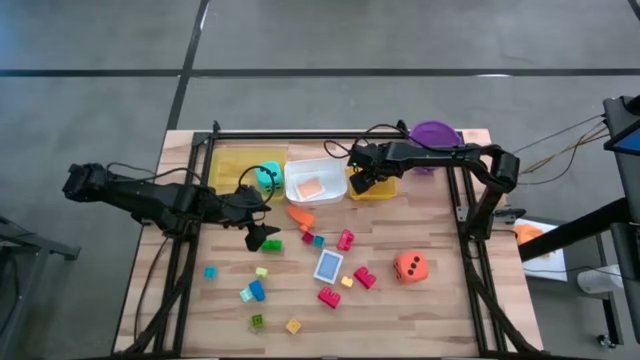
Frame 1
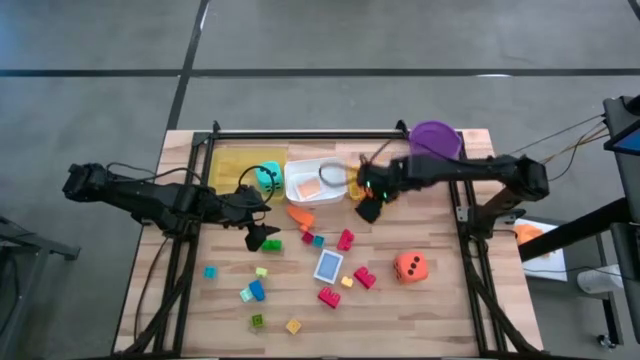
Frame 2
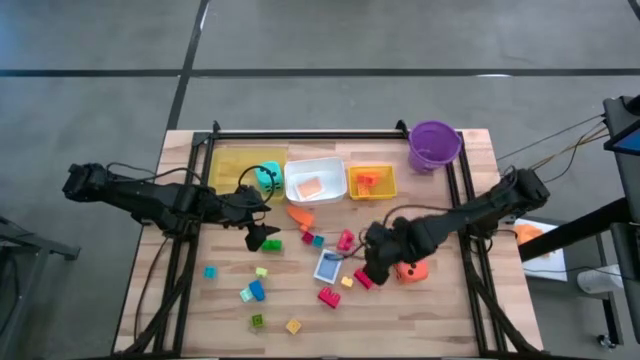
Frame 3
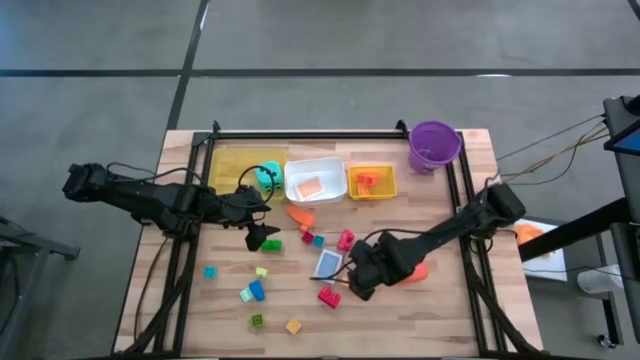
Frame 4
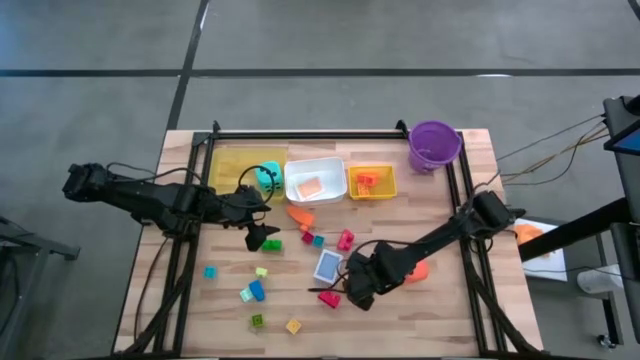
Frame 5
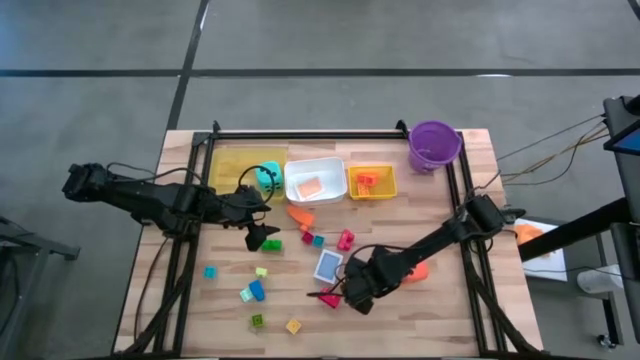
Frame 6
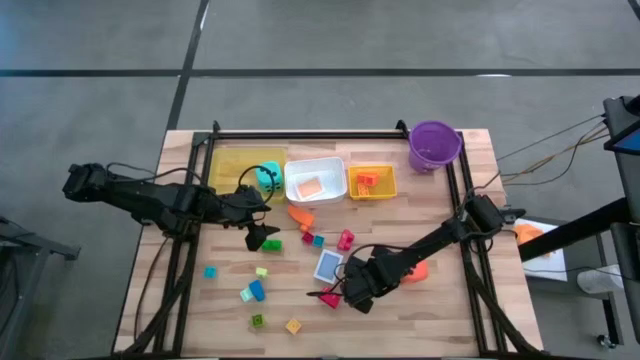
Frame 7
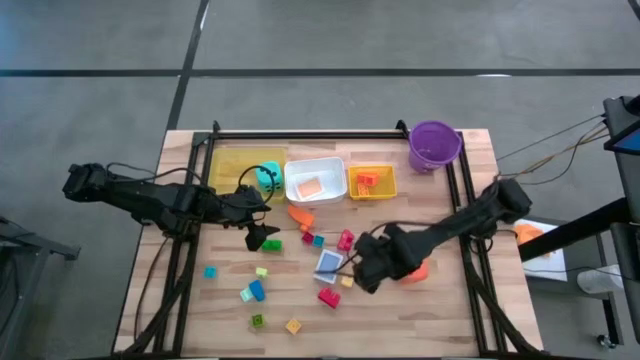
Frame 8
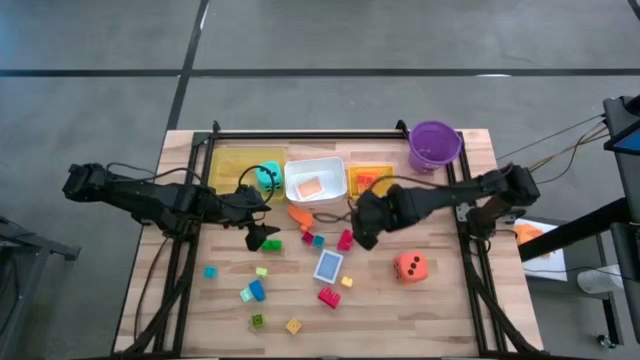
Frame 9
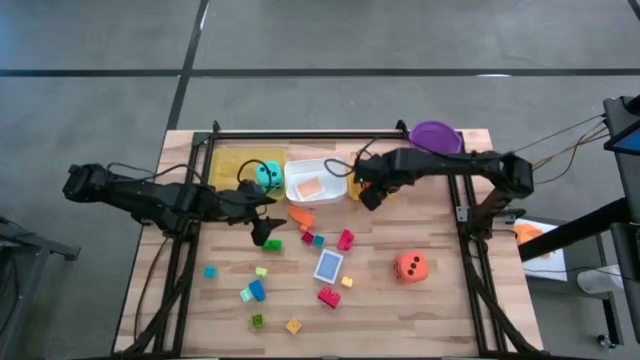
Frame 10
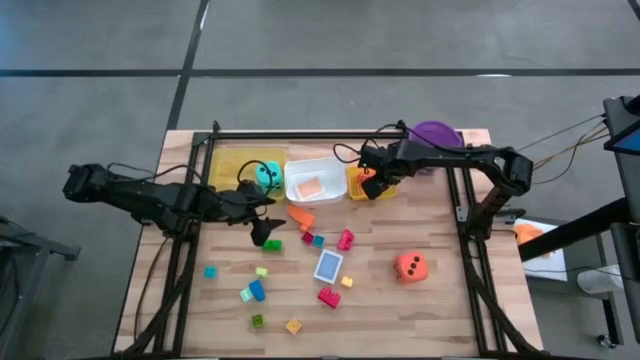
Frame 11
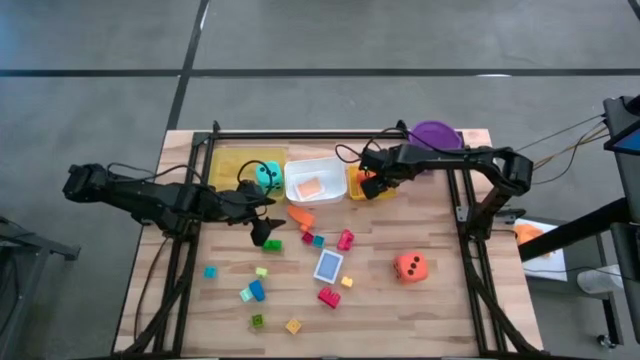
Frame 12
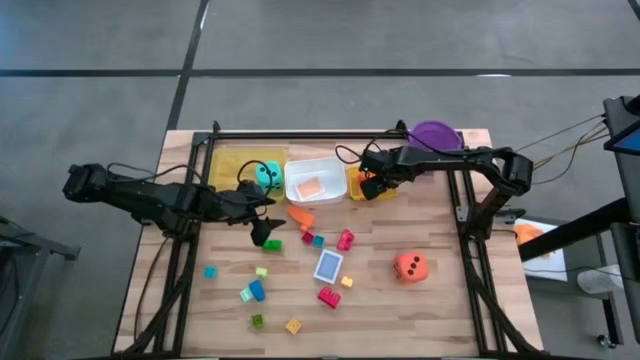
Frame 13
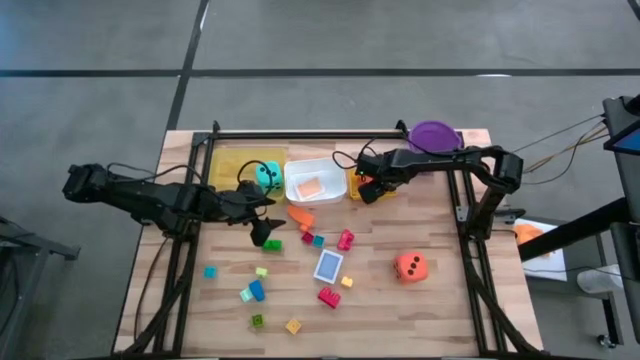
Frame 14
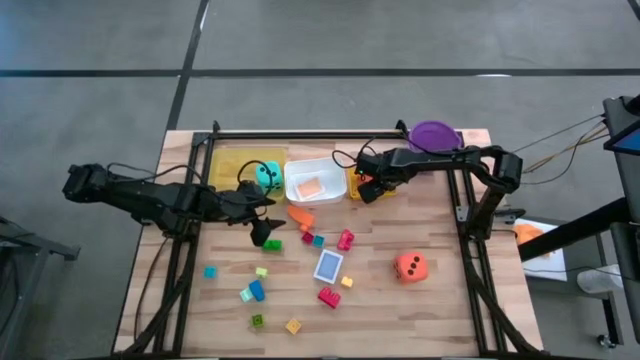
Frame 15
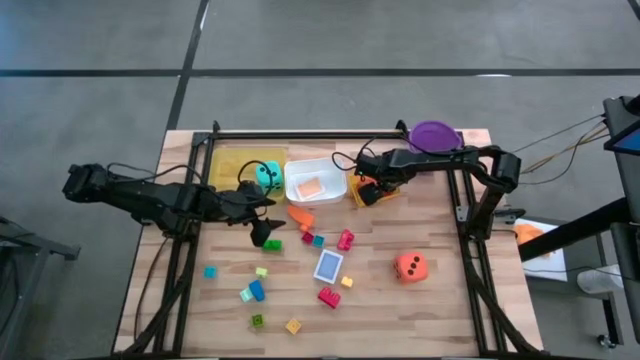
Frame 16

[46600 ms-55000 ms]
Task: Pick & Place Toys
Put the red game piece into the yellow bin

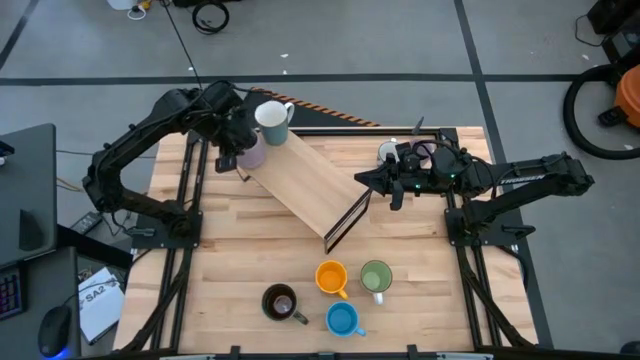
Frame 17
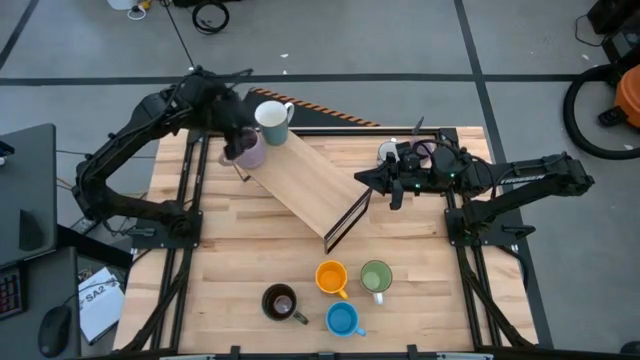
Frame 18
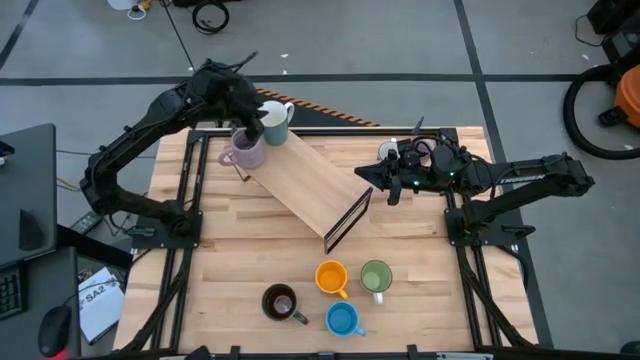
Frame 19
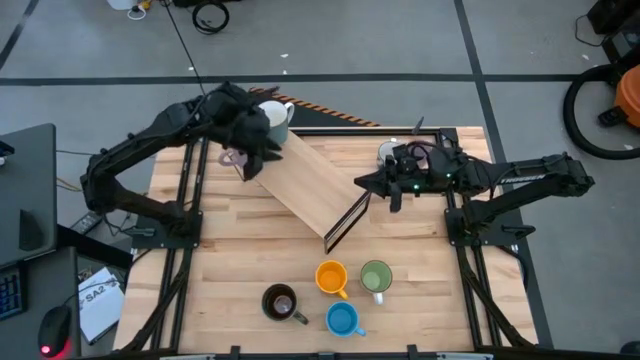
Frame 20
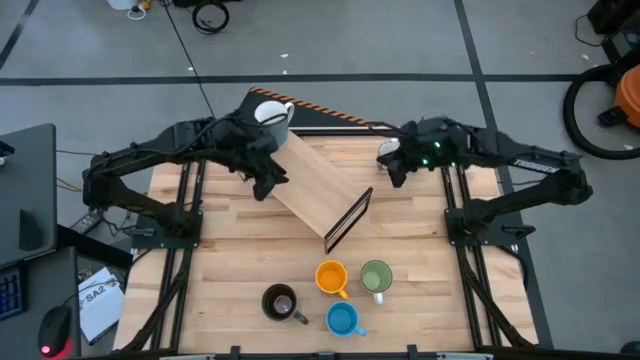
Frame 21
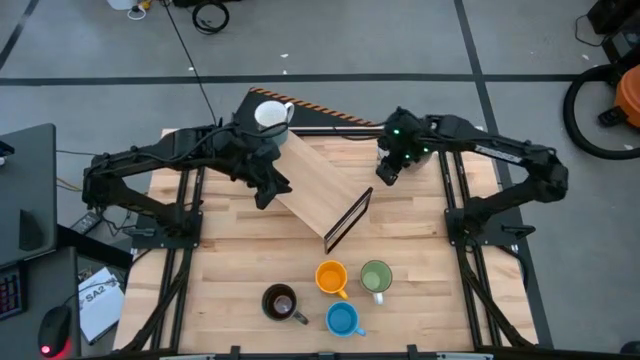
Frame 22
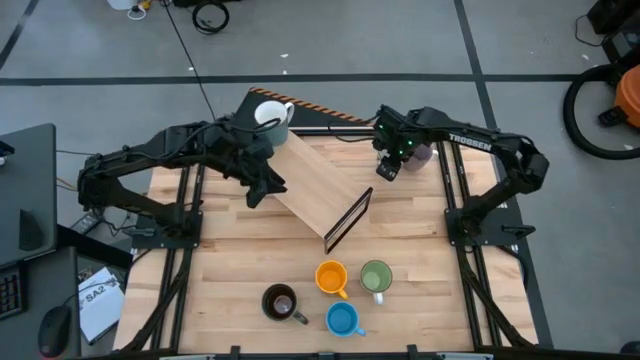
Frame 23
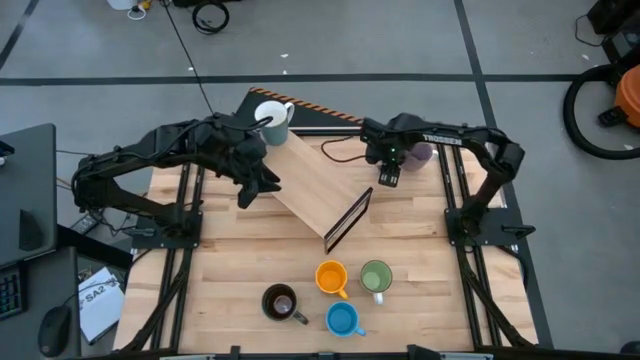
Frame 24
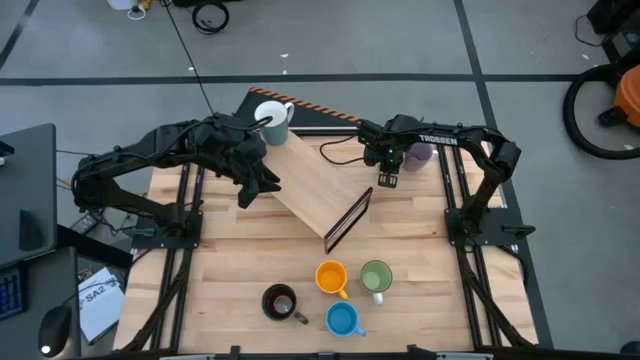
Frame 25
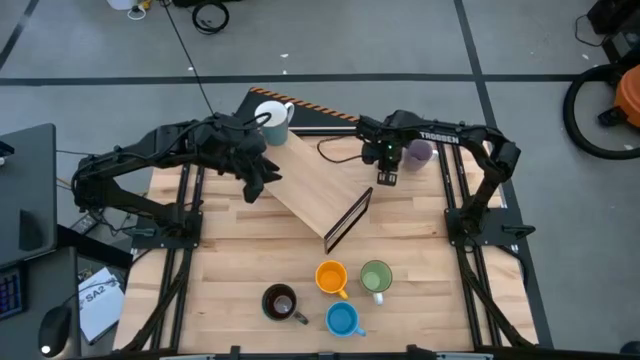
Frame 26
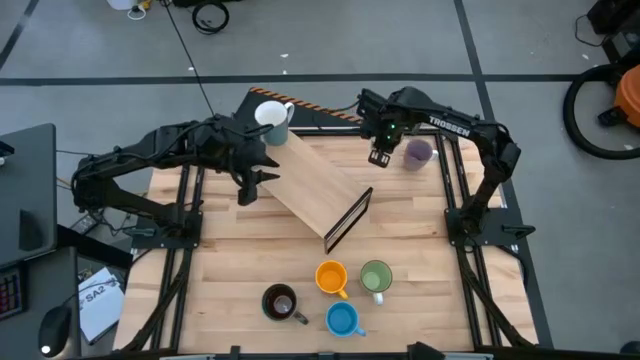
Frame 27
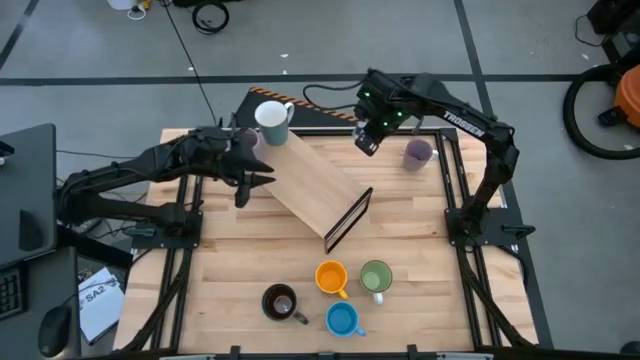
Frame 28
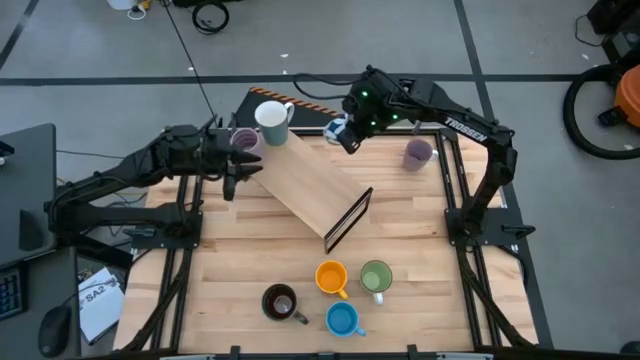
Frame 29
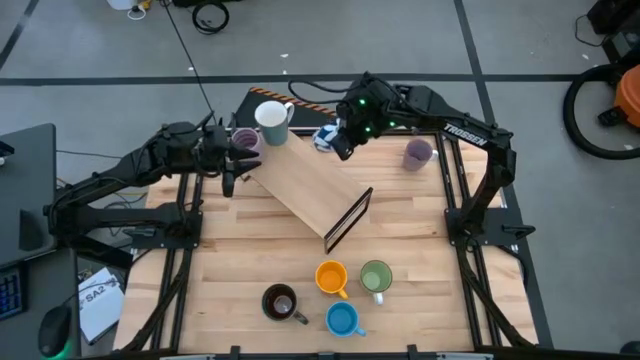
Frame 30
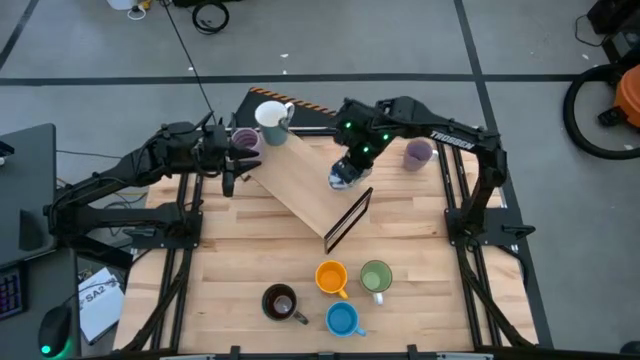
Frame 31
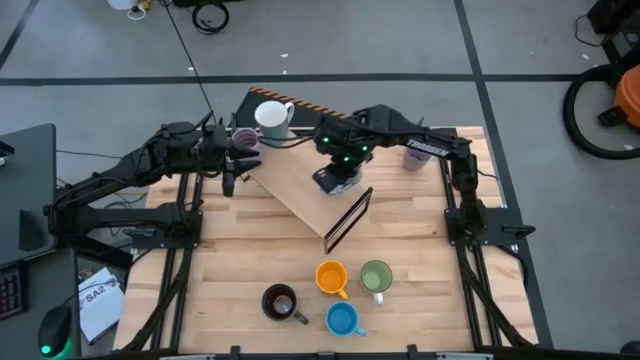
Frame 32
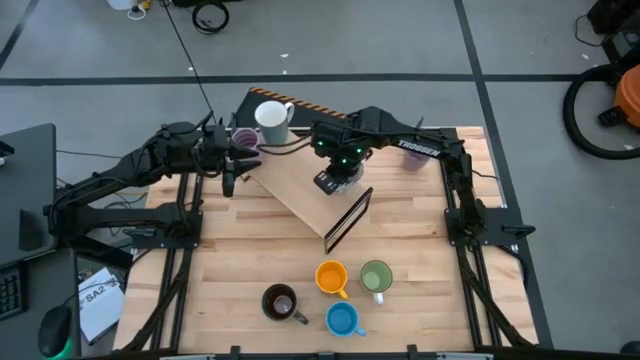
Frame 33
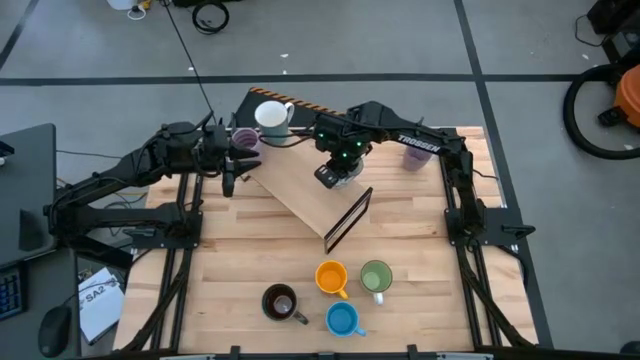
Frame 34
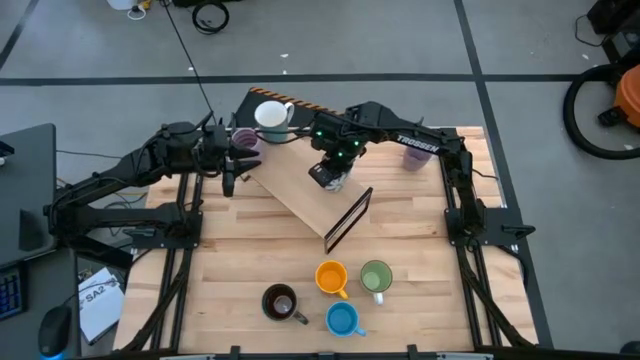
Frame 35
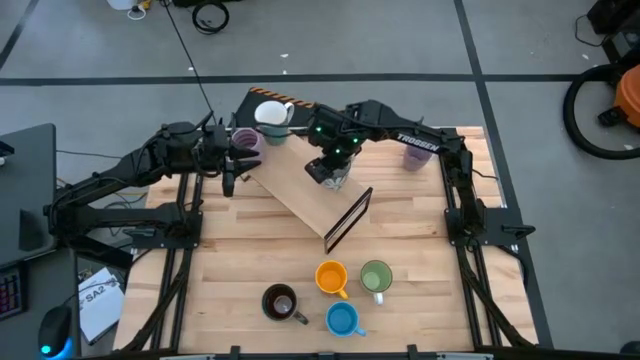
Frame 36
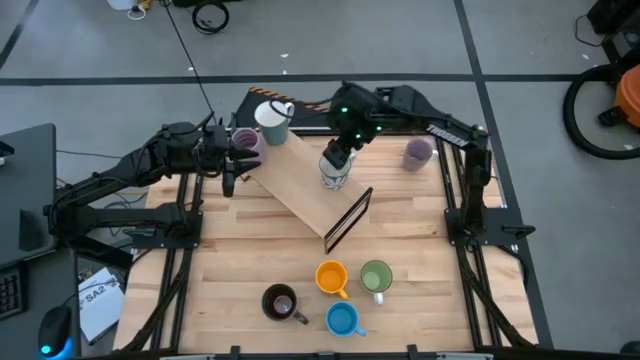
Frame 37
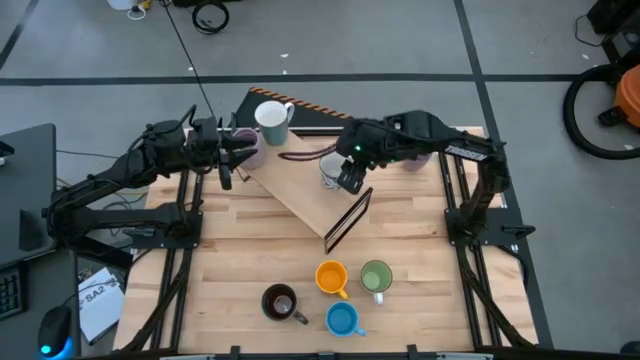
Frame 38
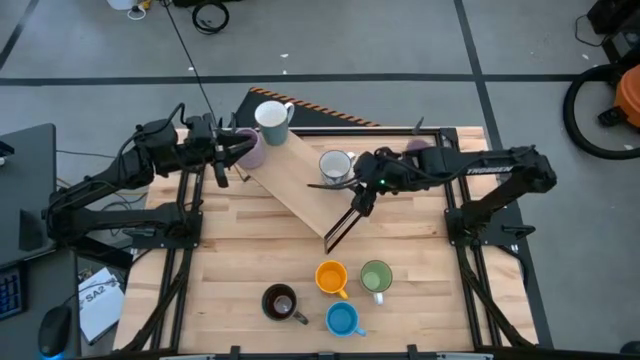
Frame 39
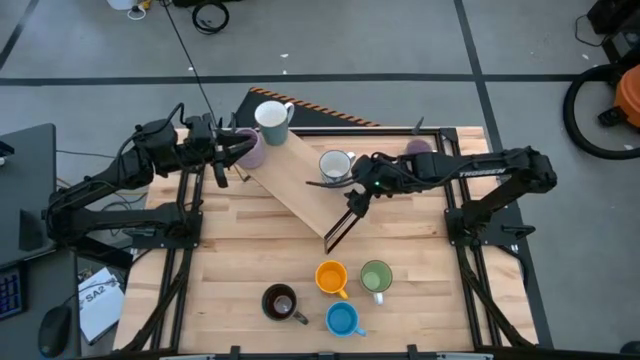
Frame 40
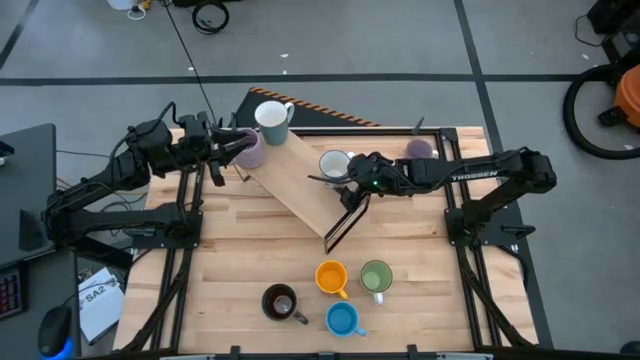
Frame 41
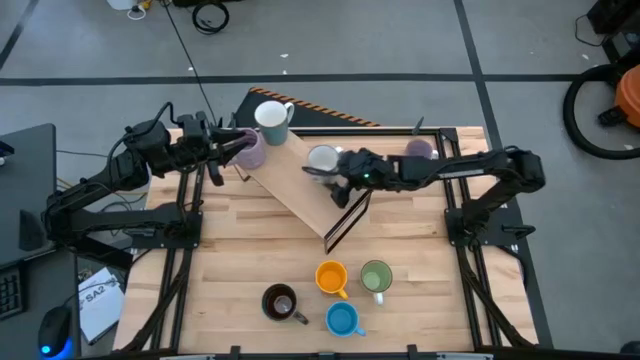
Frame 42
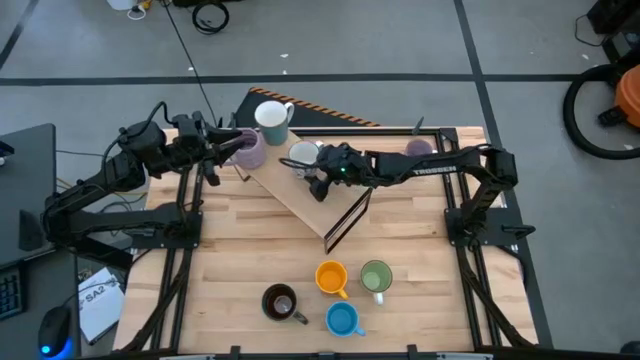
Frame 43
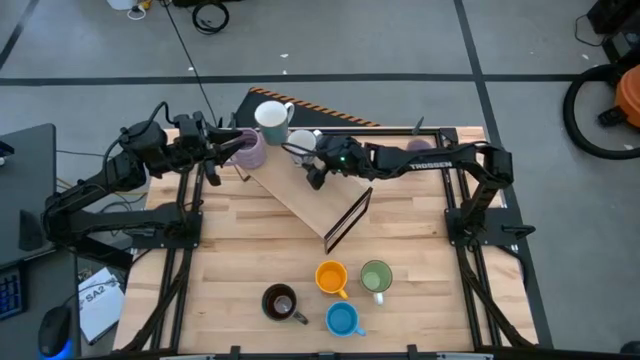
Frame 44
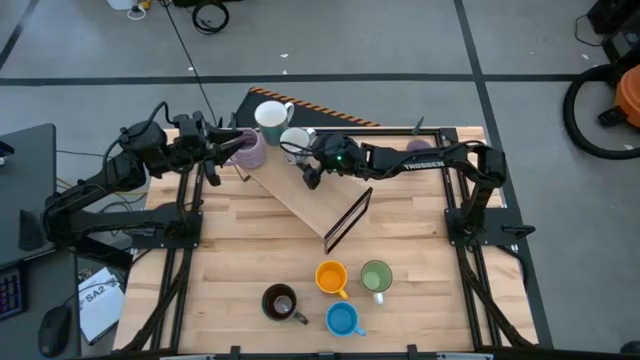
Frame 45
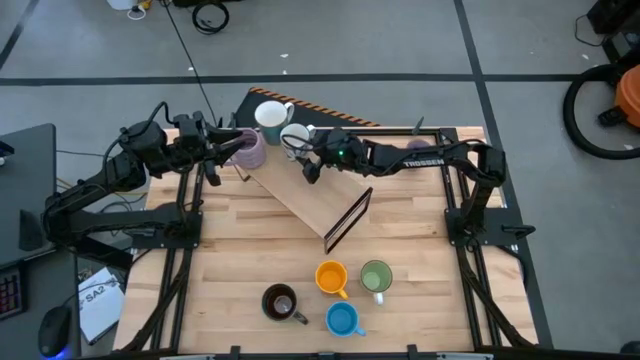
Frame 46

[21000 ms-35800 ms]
Task: Place coffee mugs
Put the white patterned mug on the shelf
